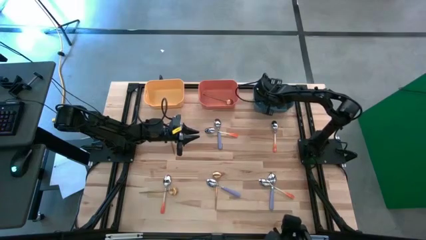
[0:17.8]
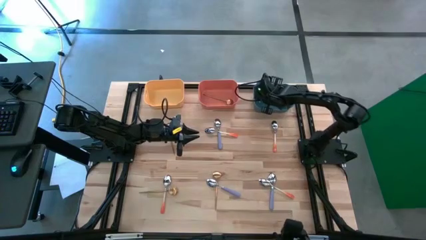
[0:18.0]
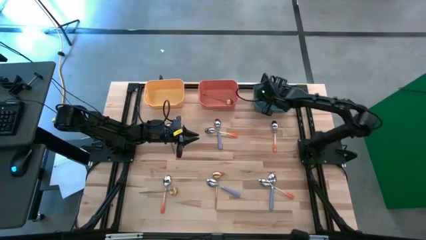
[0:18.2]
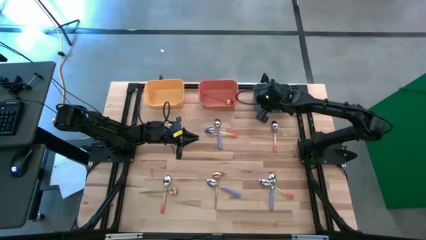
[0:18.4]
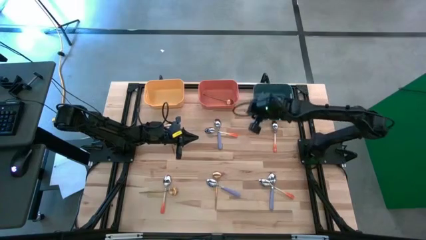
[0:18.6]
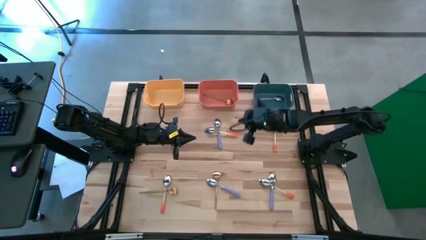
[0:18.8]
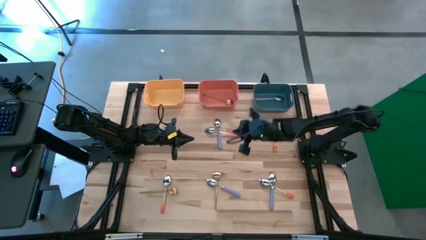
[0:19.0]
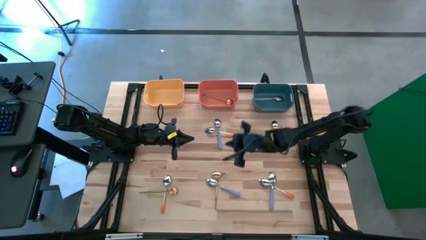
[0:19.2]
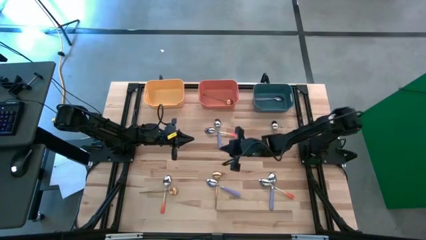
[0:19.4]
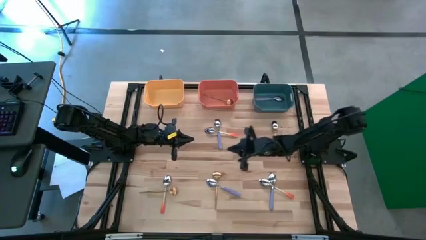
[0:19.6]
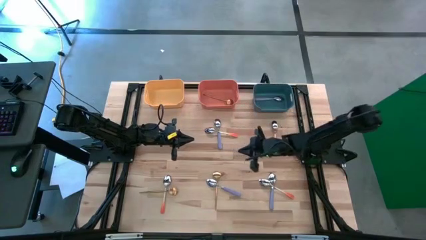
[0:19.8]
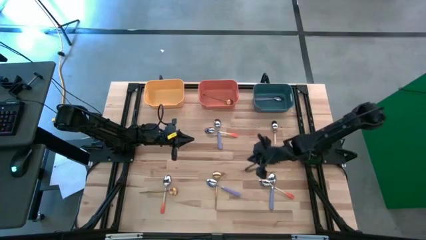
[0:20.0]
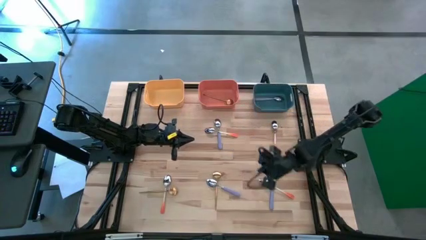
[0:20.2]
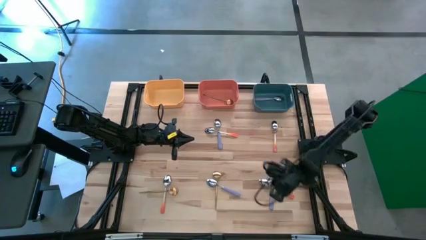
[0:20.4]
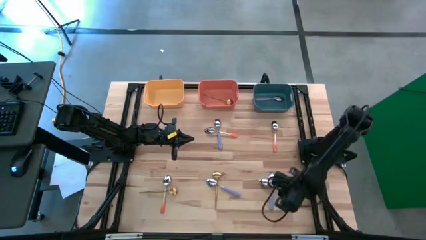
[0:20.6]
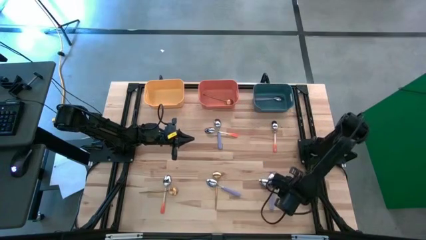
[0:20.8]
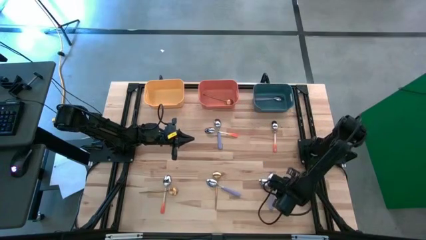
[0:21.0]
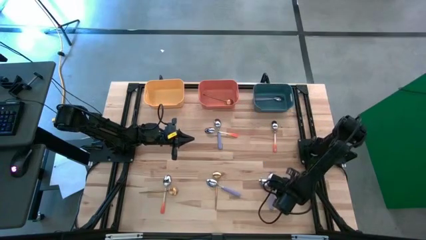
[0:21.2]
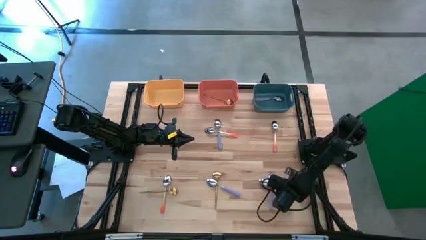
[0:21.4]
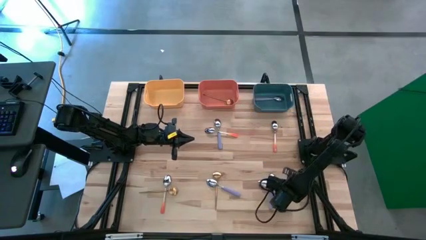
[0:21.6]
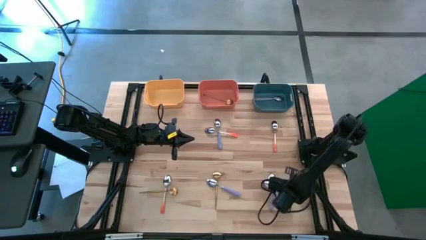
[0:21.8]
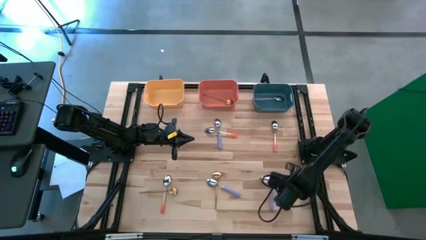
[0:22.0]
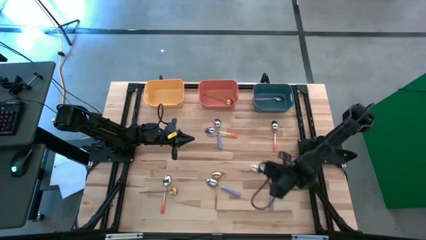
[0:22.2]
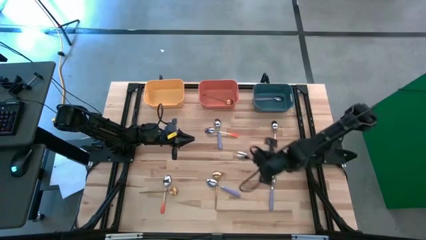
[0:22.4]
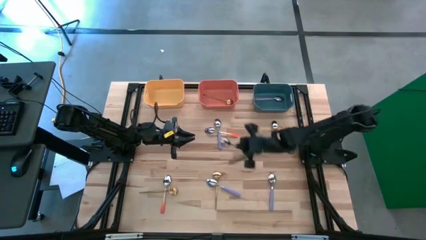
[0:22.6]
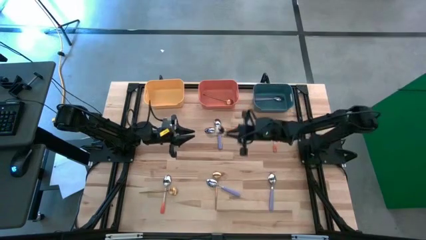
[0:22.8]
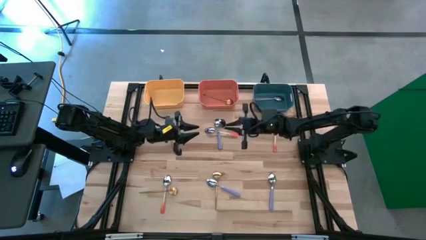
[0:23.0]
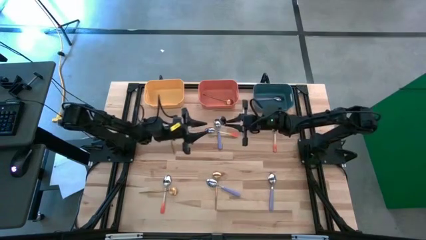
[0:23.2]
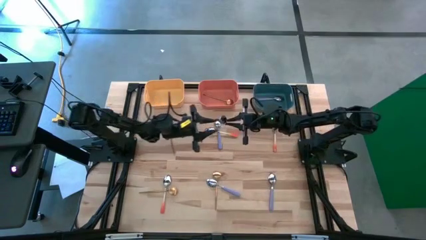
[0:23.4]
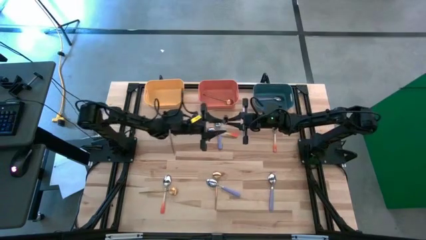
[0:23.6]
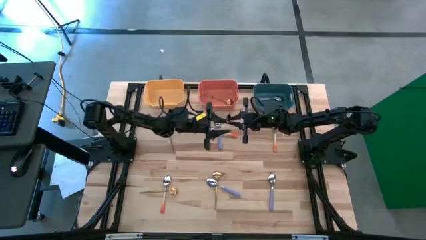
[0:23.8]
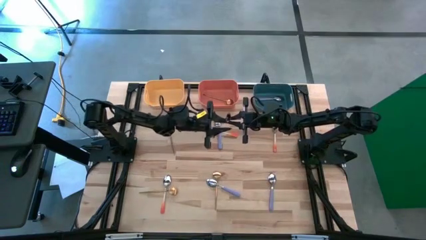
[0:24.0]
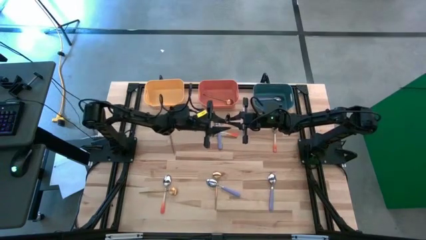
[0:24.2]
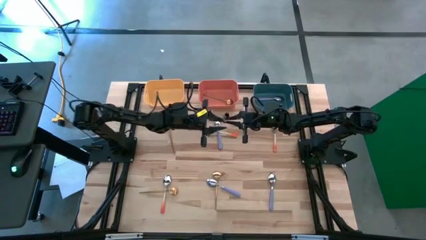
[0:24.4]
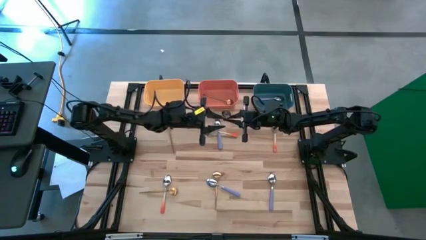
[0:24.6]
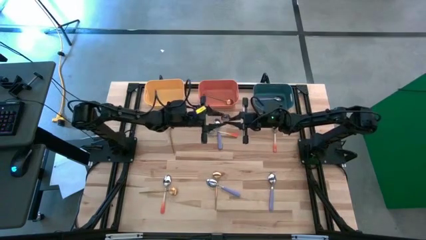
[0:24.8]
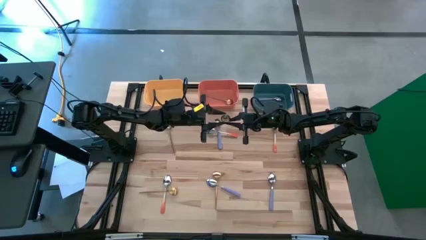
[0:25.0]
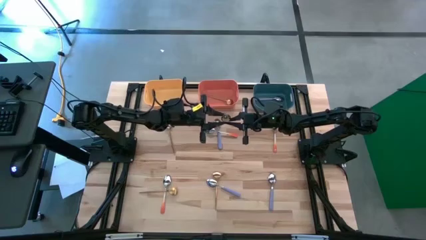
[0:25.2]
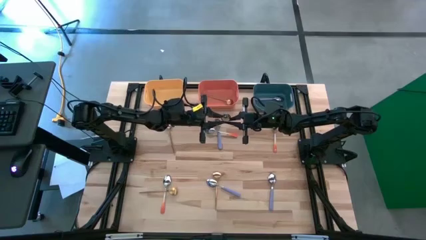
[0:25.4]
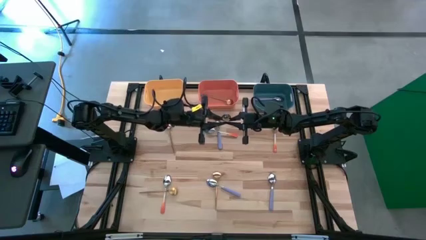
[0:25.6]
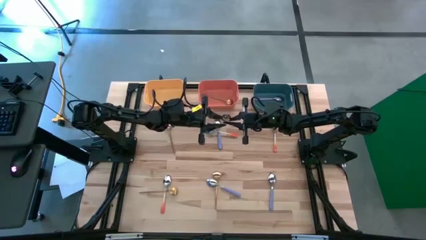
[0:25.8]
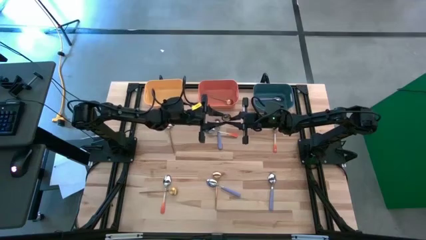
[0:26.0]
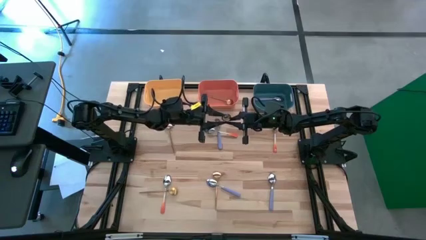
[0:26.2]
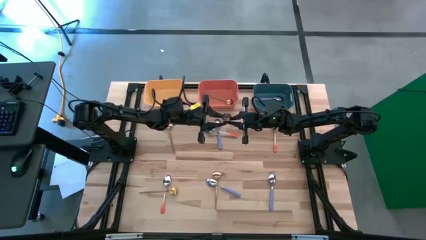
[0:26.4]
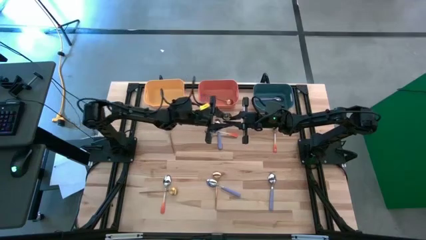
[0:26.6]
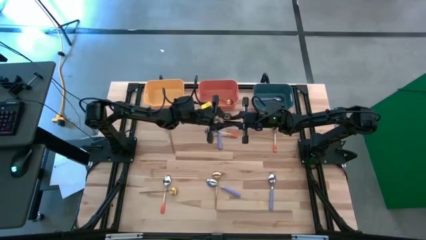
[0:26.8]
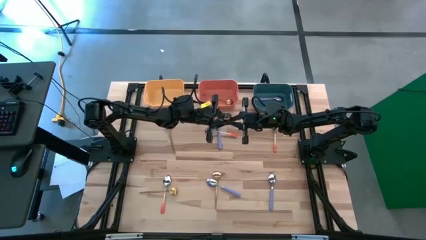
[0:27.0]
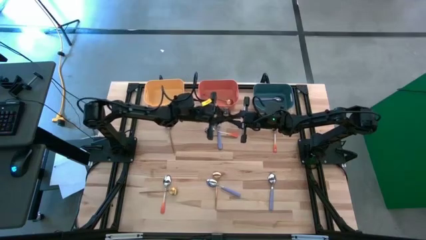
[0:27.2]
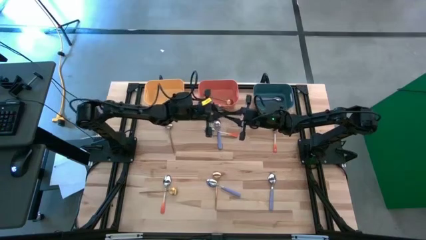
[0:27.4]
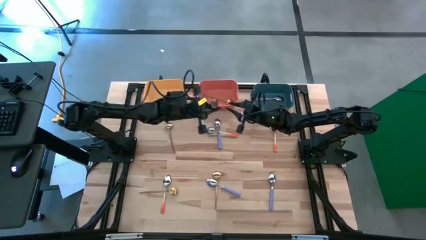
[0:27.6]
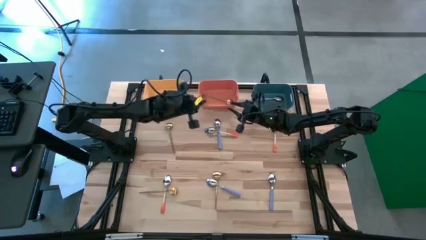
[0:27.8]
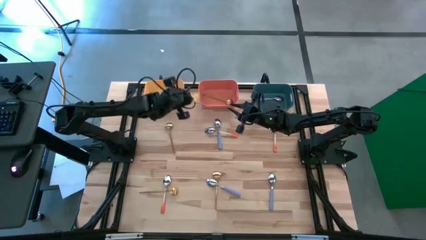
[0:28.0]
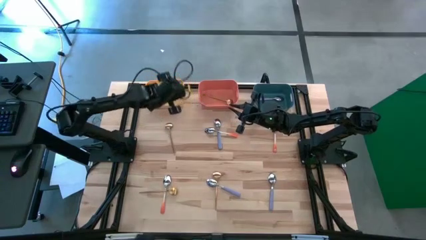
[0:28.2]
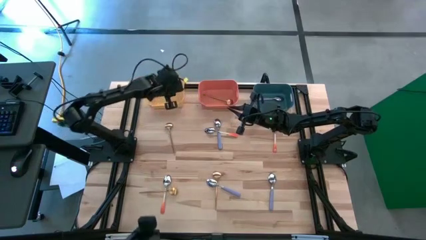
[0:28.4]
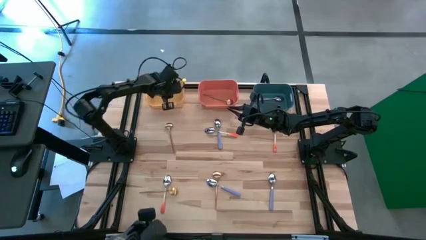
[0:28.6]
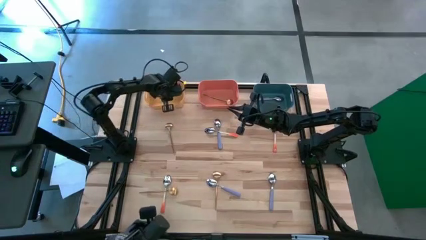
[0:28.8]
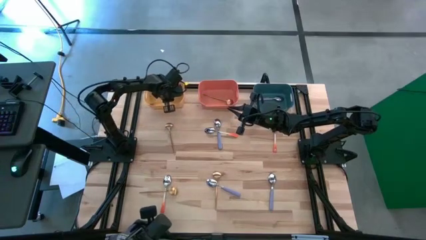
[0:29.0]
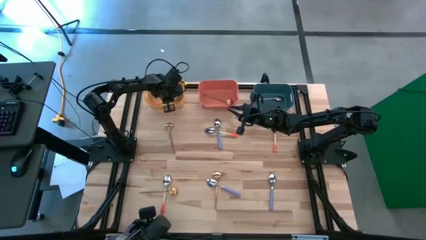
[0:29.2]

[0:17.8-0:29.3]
Task: Sort silverware by color (type)
Put the orange spoon into the yellow bin

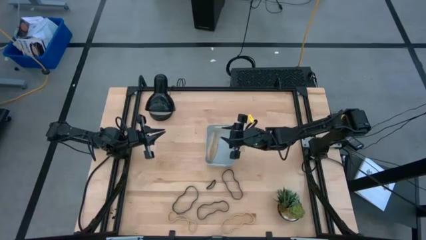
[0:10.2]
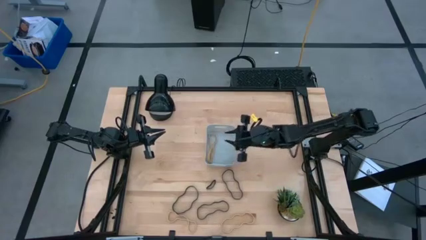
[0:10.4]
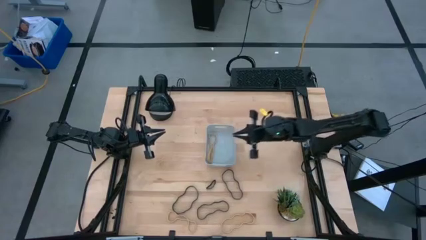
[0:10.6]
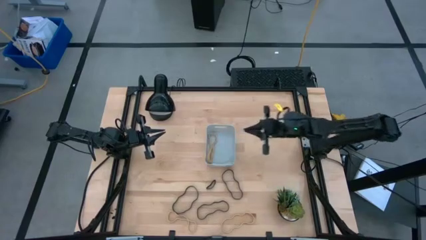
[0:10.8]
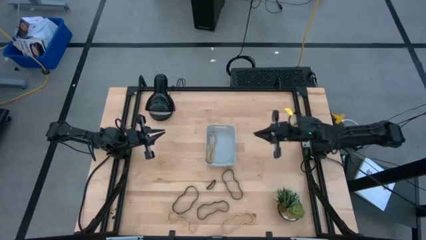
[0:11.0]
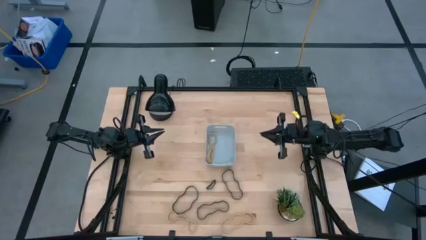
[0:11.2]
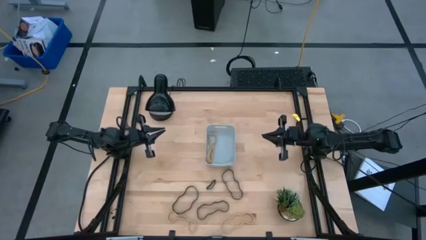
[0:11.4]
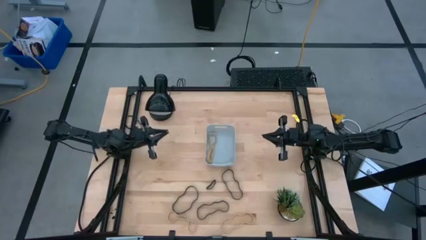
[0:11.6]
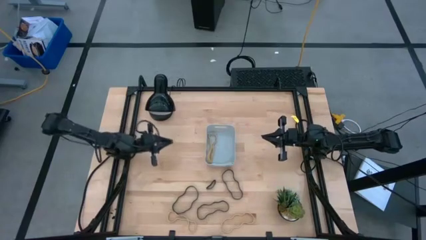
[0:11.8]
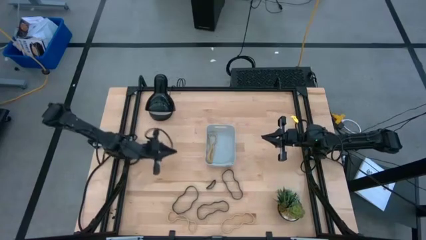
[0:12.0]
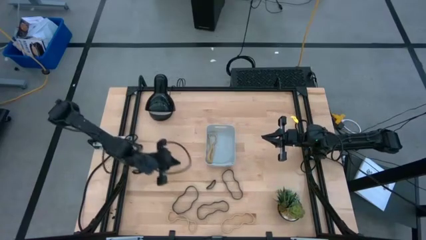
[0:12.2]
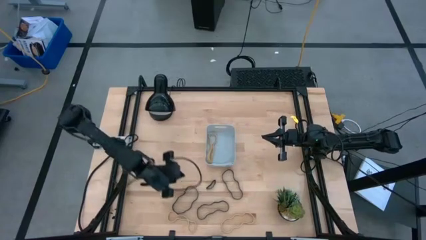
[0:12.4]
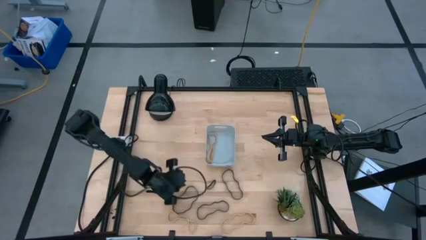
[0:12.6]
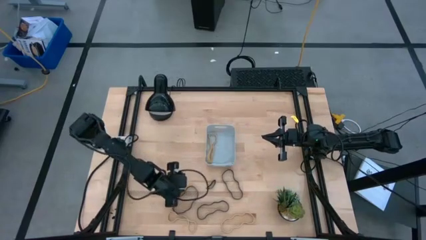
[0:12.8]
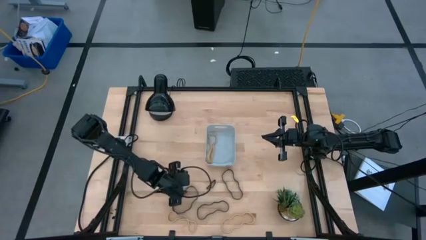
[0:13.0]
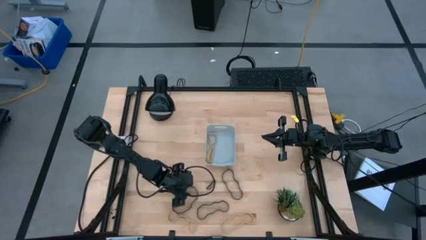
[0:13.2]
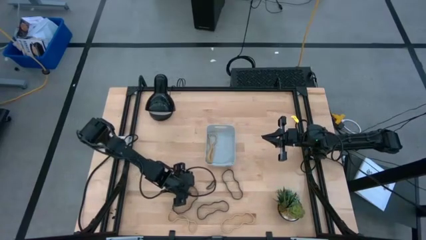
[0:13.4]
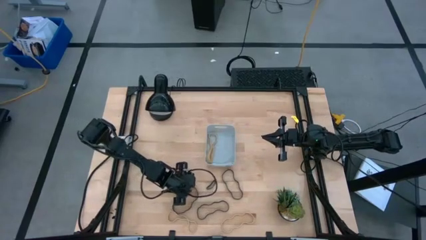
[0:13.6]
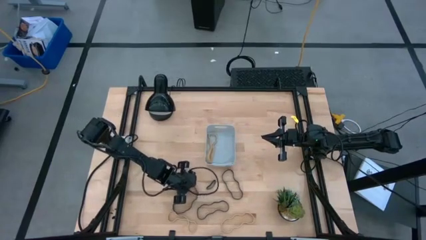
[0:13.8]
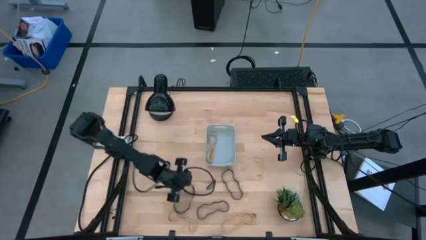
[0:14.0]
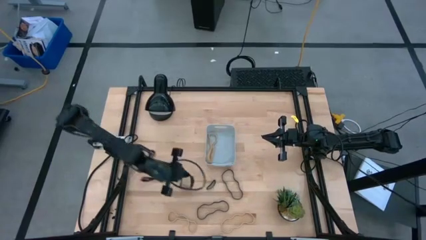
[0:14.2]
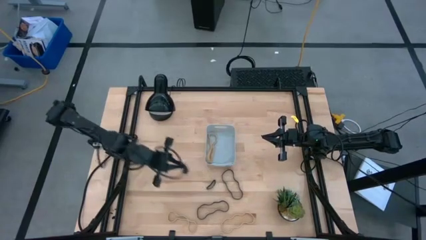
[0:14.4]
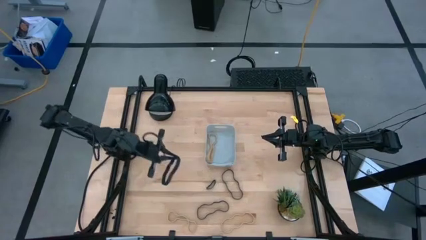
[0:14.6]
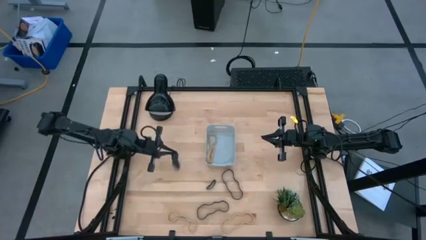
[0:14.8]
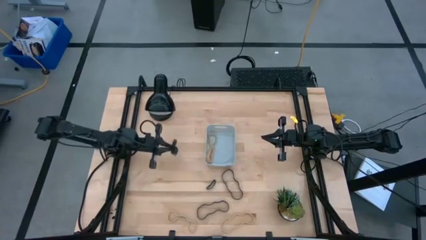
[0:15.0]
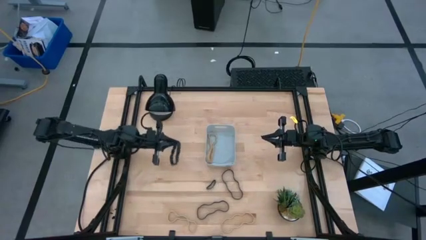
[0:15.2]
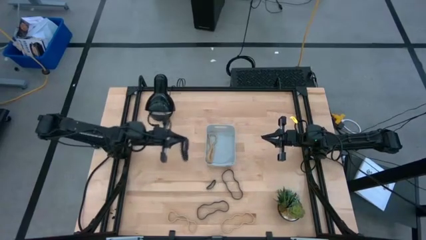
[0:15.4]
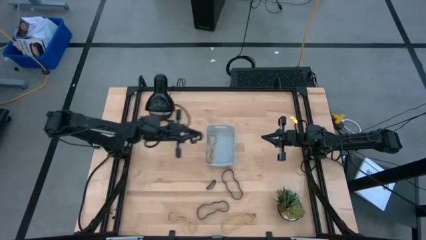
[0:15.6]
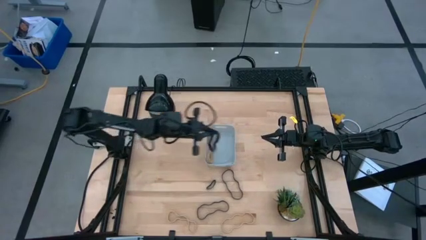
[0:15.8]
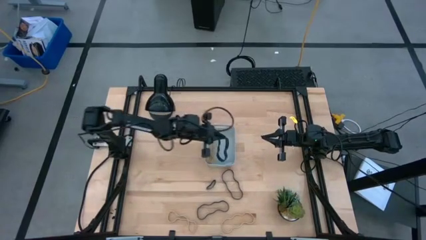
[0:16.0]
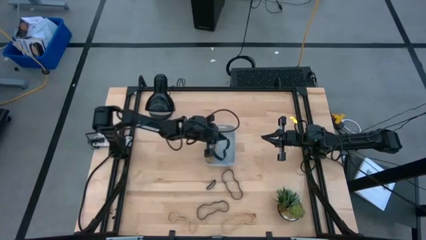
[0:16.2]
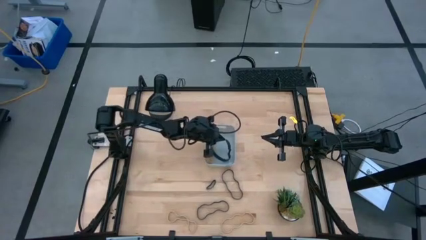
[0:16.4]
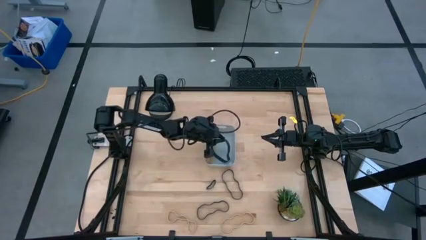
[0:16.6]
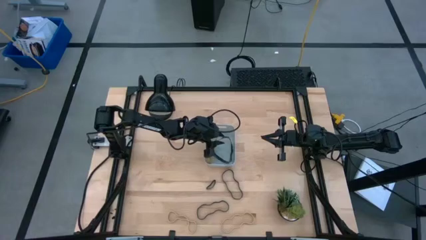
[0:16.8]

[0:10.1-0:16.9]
Task: Pick and place rubber bands into bin
Put the bottom left large black rubber band into the gray bin
